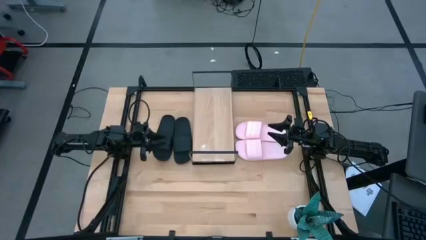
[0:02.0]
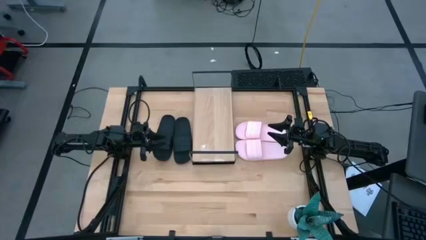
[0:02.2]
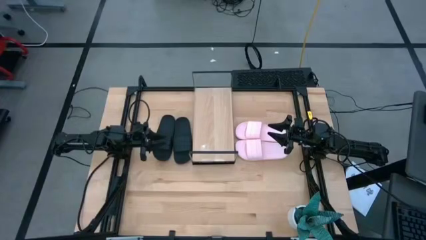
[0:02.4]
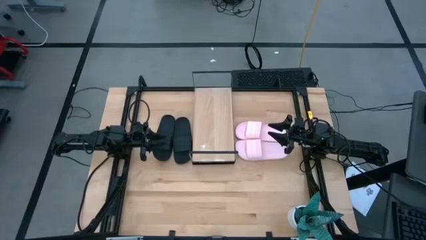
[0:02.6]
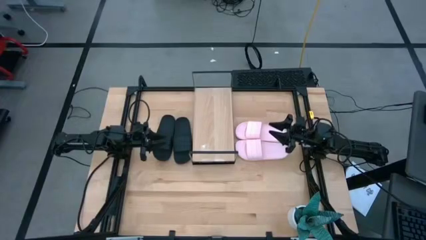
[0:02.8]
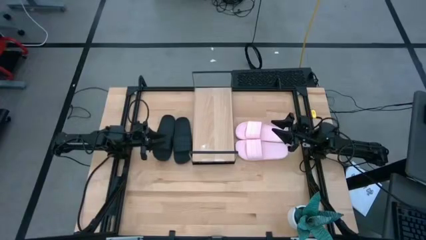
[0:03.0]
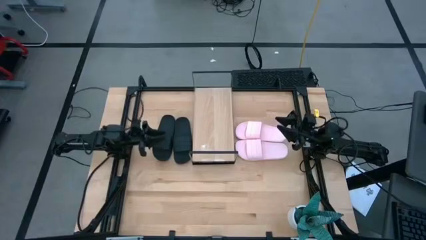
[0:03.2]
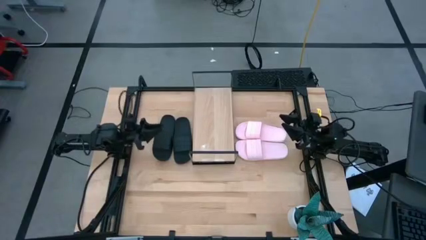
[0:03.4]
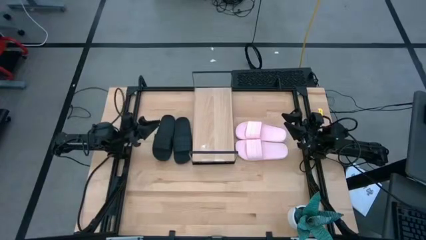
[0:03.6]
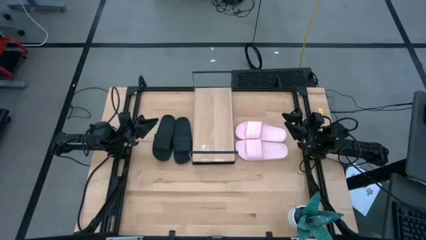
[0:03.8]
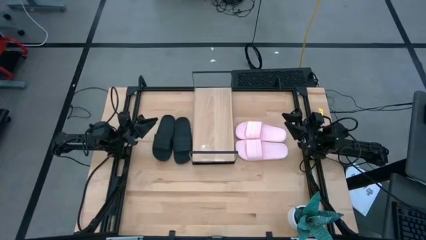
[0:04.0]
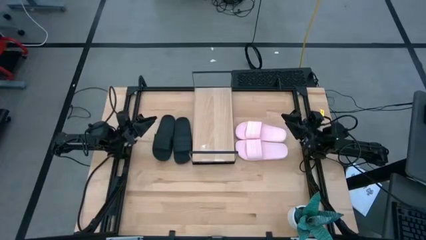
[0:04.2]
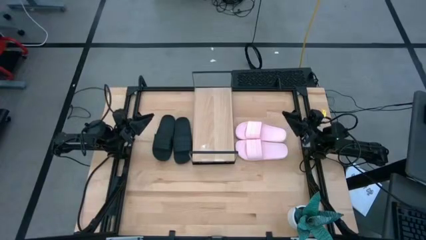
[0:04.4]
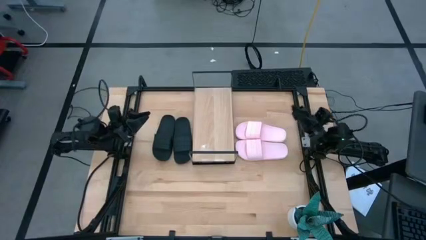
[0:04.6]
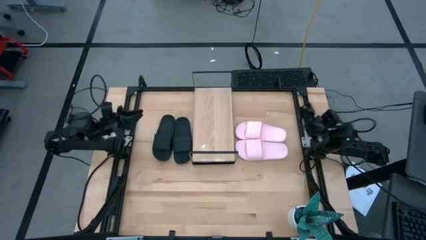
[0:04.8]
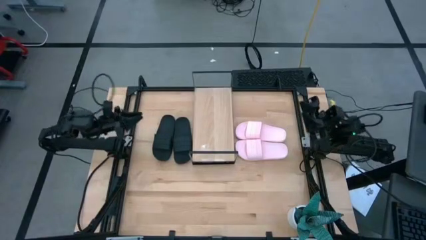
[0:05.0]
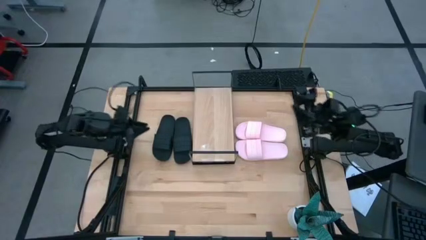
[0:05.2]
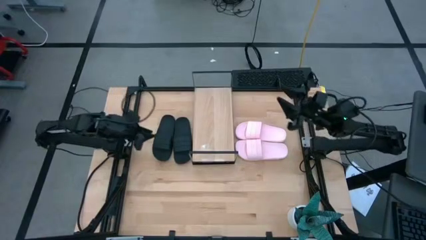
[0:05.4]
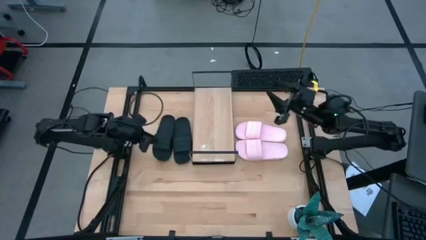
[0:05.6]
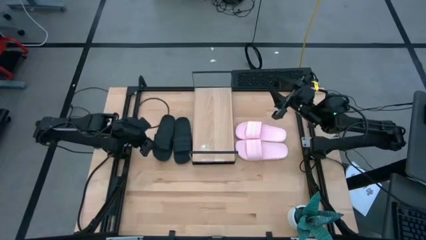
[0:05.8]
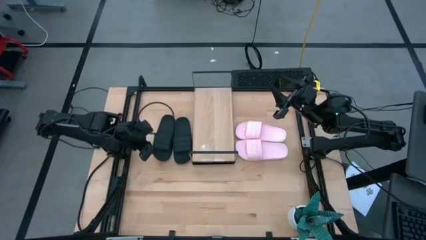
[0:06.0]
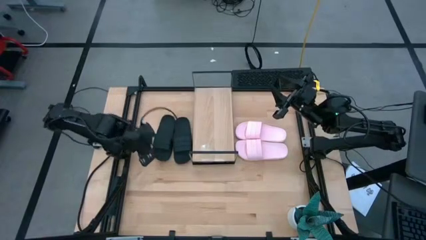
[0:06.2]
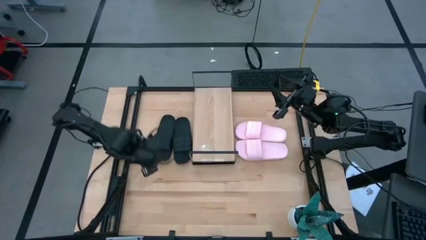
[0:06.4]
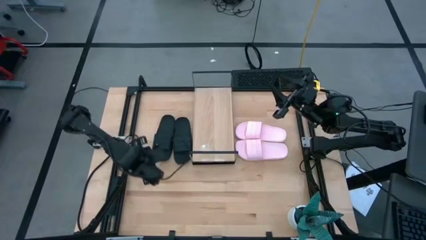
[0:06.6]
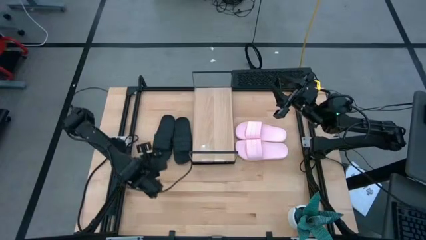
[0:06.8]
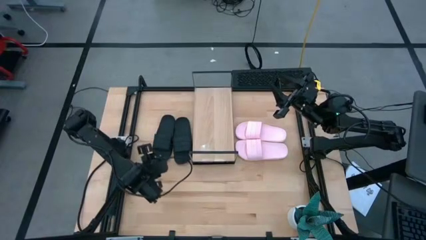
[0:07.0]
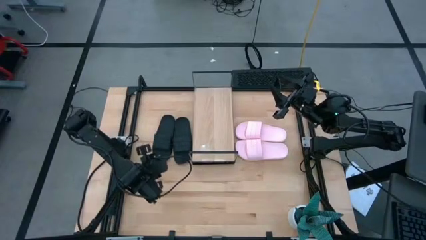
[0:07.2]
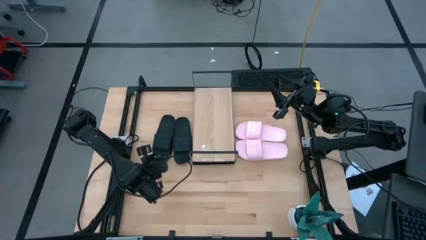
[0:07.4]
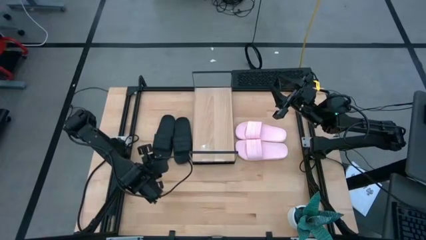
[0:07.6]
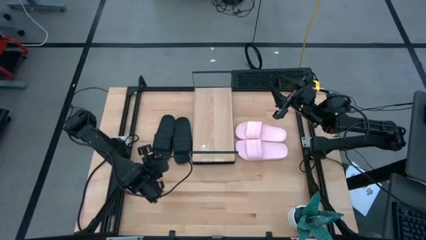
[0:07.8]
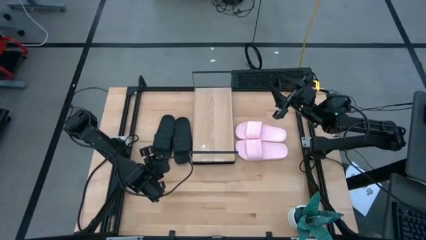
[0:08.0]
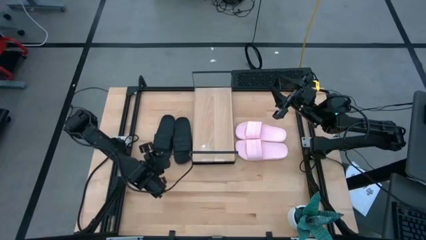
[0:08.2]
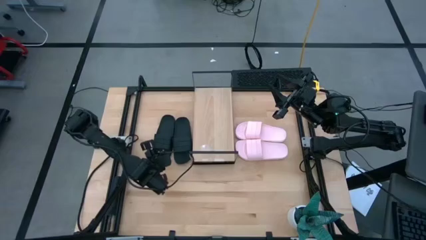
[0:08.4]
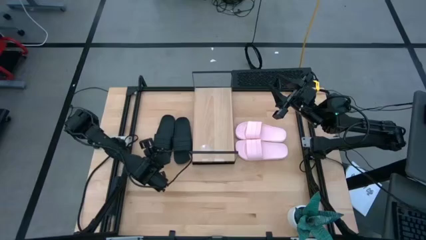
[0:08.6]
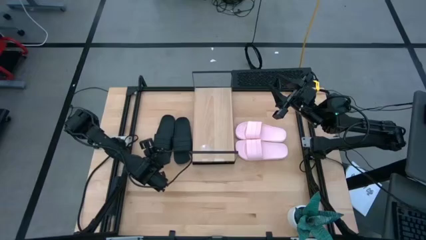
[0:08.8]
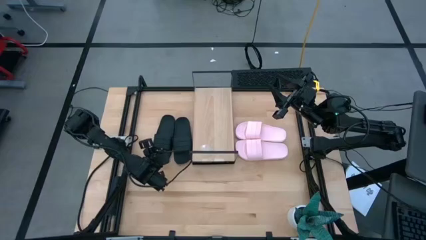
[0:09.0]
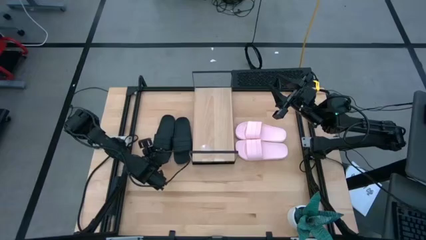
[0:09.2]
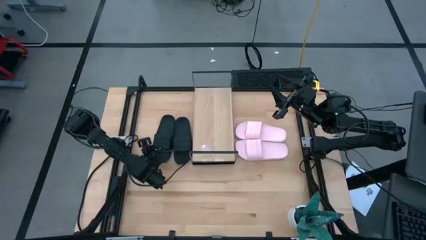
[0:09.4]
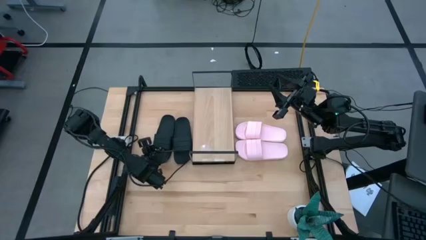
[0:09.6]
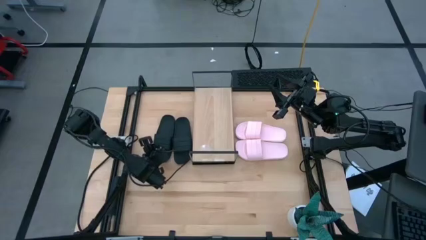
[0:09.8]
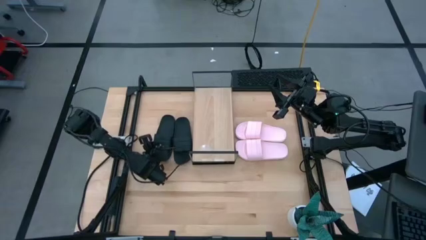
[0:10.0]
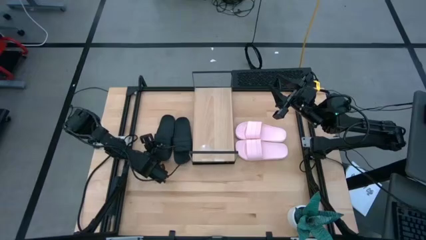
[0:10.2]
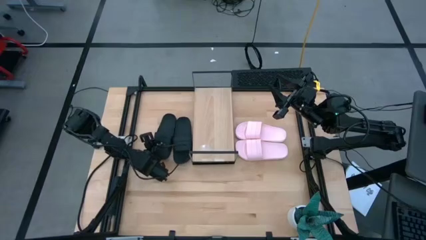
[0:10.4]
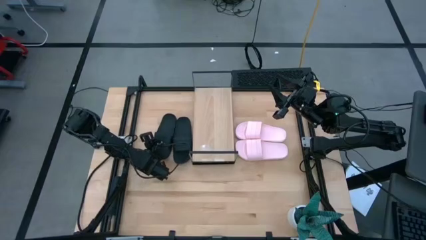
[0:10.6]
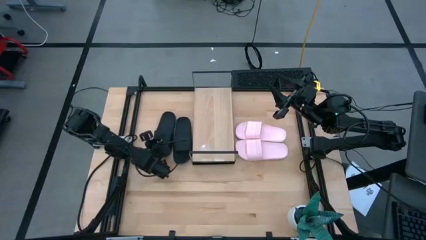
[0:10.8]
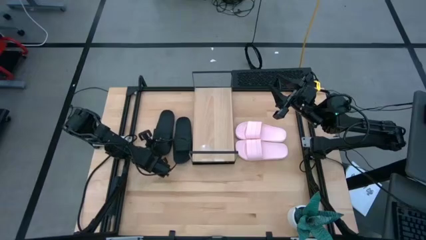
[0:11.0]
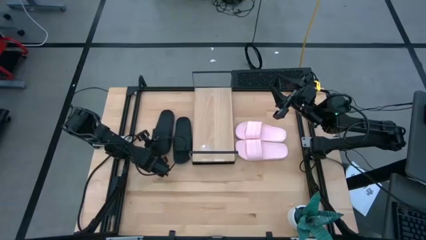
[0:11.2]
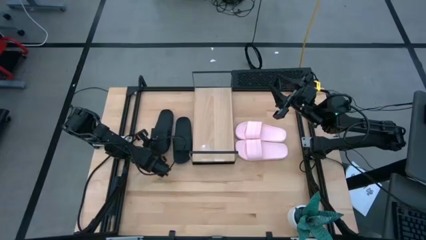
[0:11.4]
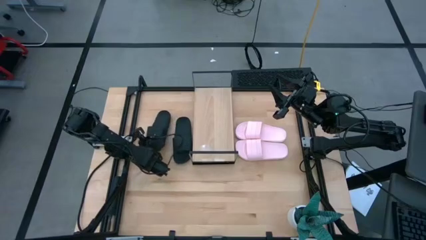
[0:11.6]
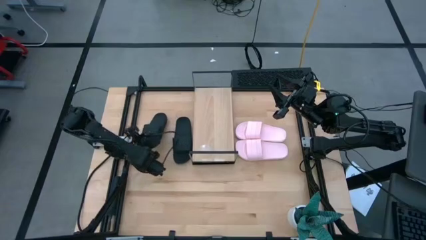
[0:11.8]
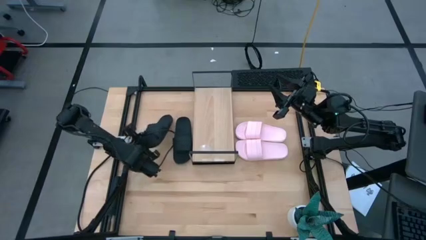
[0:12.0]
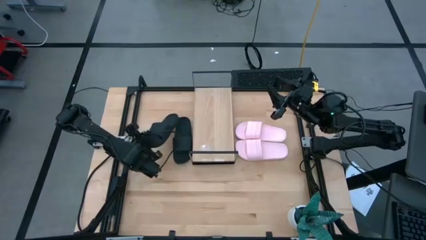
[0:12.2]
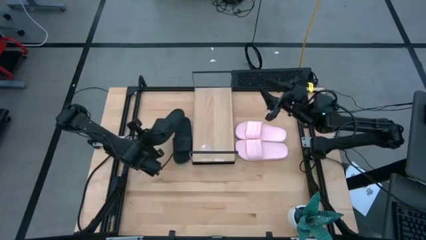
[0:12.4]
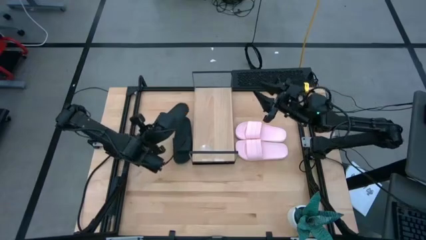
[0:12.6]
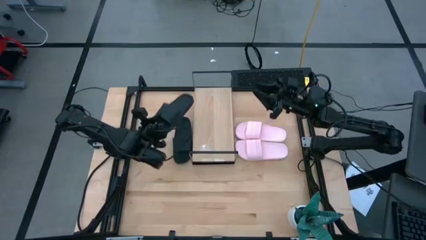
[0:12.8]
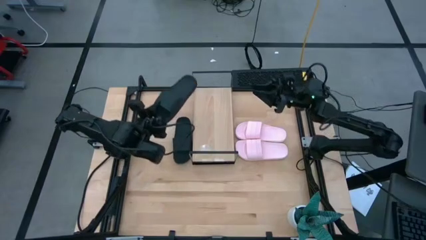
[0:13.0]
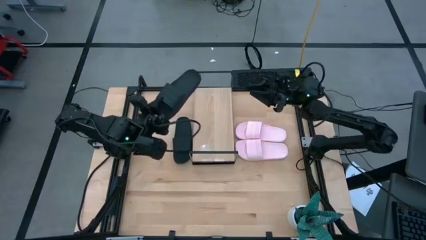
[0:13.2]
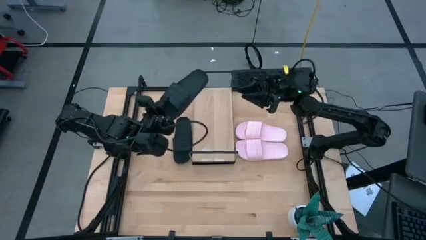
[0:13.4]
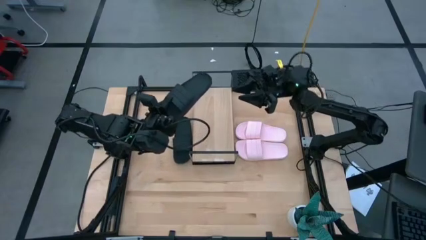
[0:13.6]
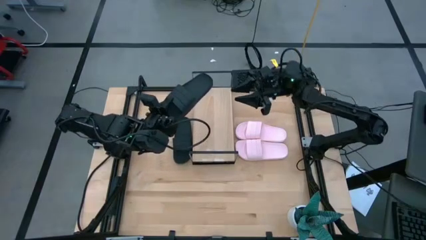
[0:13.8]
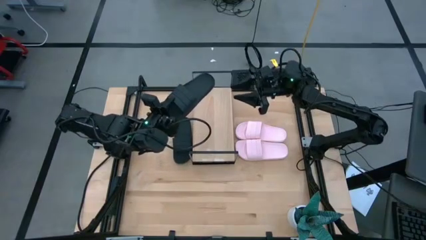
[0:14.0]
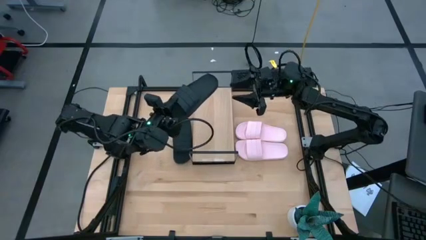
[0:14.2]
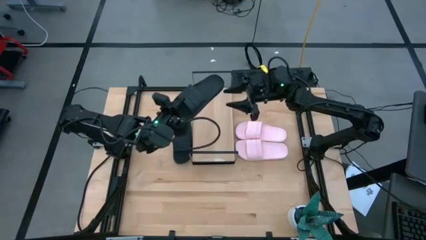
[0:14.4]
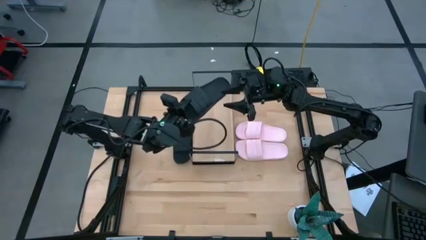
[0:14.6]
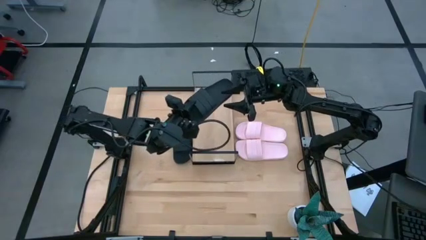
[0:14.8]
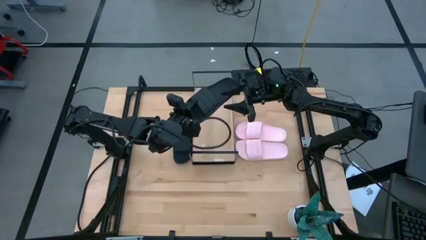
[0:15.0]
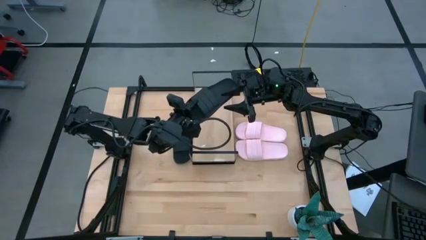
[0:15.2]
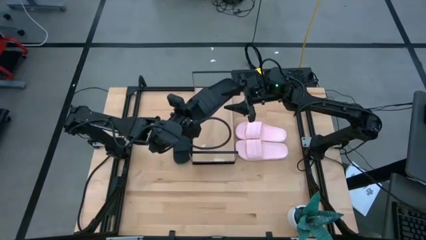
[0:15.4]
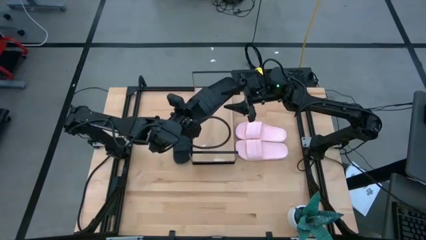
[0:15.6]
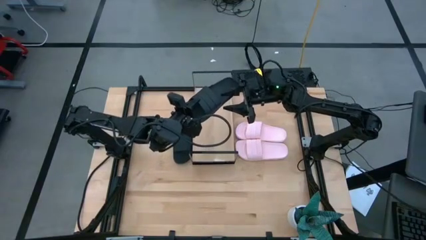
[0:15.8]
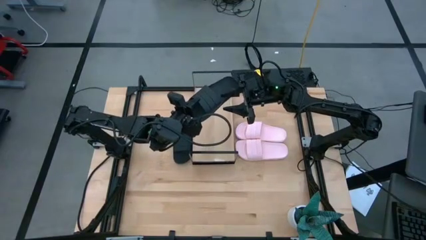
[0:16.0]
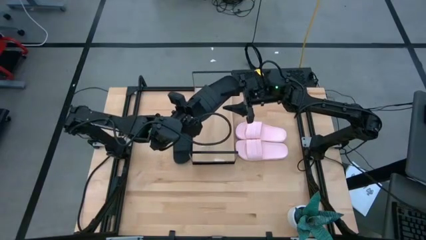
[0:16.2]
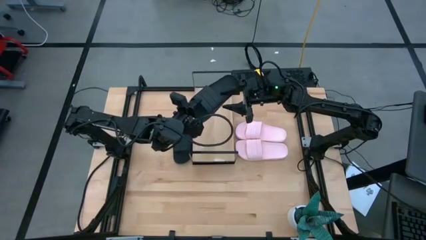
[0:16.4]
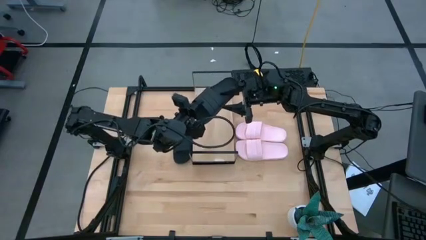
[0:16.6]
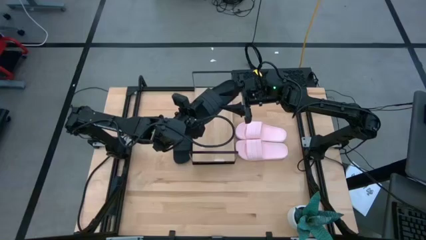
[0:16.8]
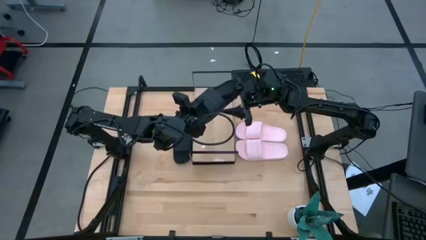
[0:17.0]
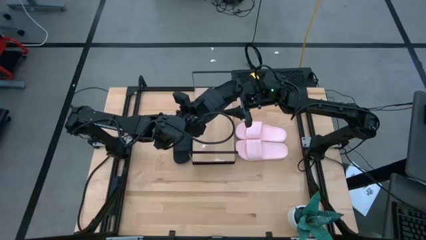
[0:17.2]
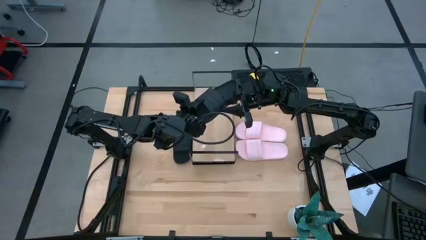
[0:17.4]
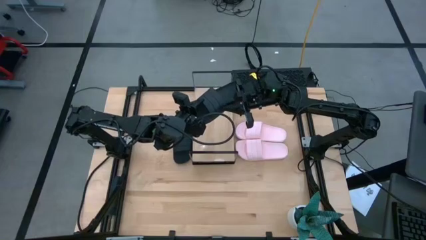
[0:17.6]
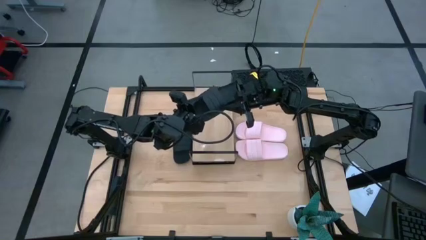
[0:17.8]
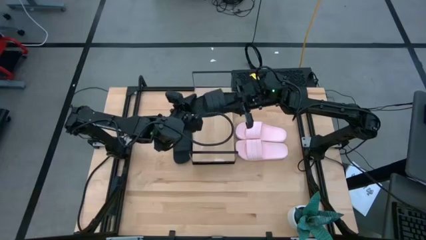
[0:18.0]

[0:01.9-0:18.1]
Task: Pick and place slides into the shelf
Put the left black slide on the shelf
